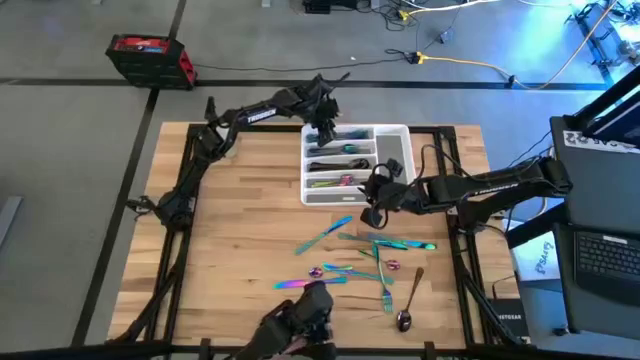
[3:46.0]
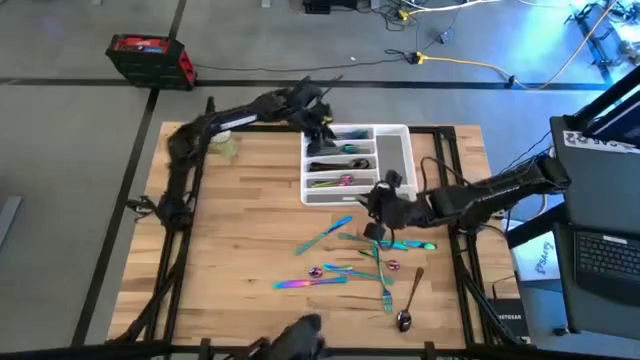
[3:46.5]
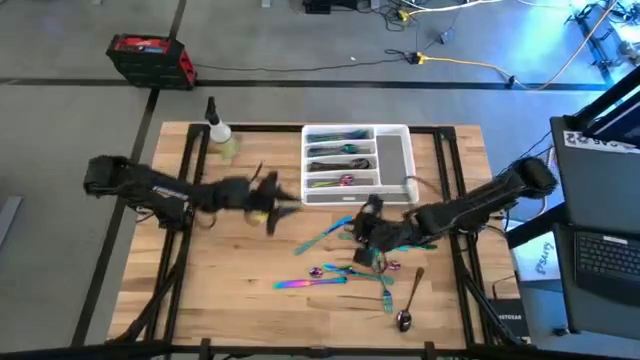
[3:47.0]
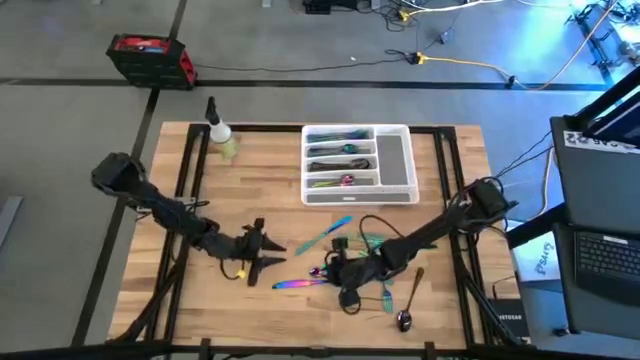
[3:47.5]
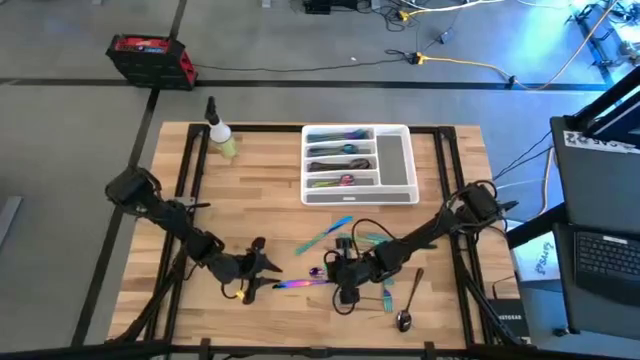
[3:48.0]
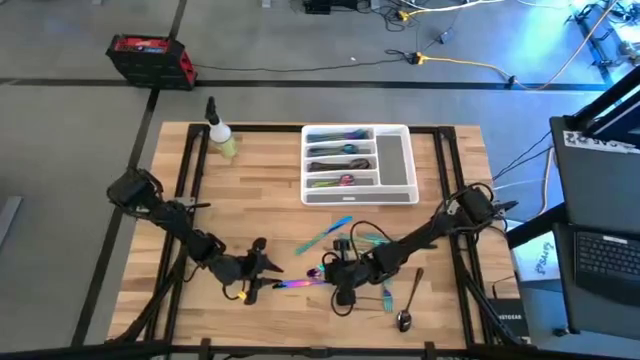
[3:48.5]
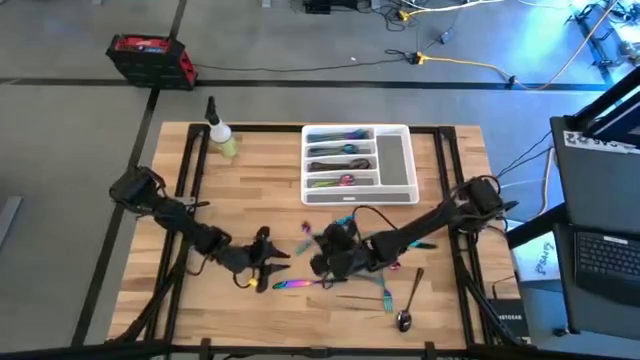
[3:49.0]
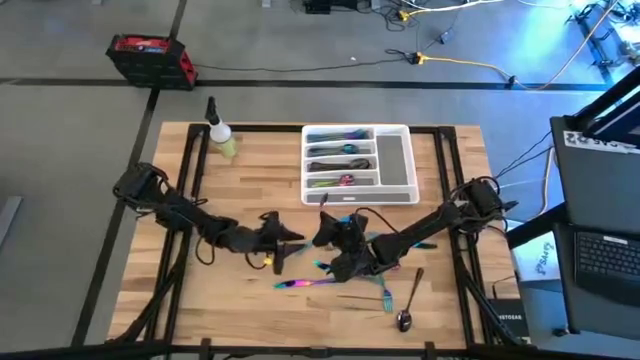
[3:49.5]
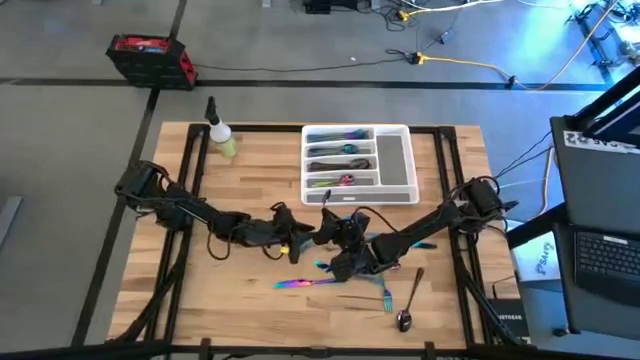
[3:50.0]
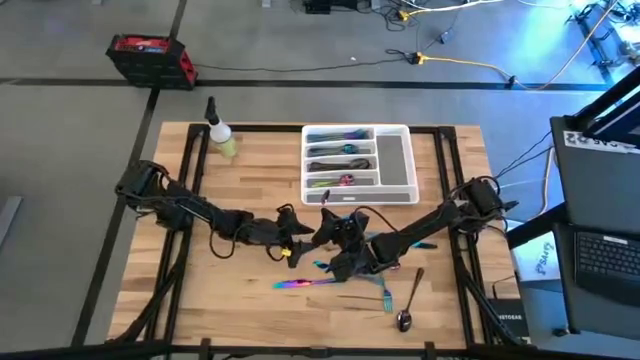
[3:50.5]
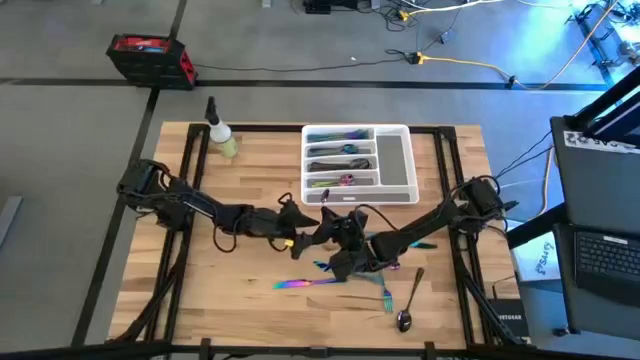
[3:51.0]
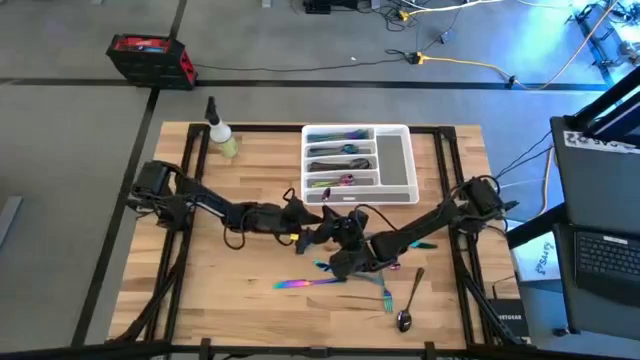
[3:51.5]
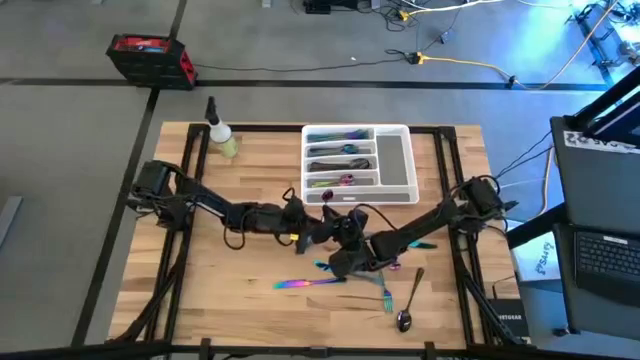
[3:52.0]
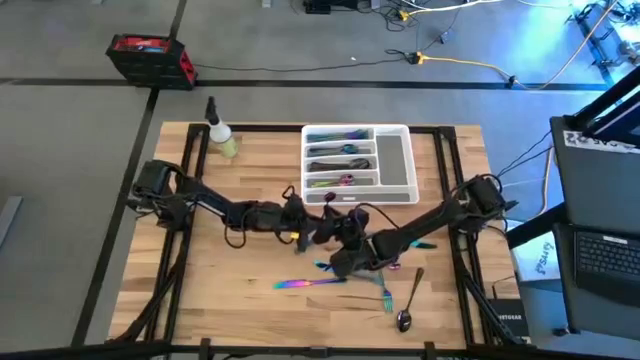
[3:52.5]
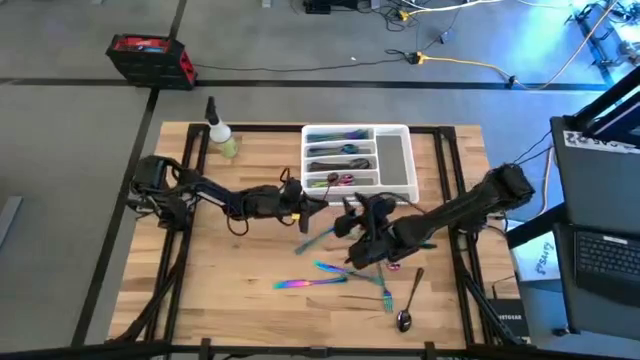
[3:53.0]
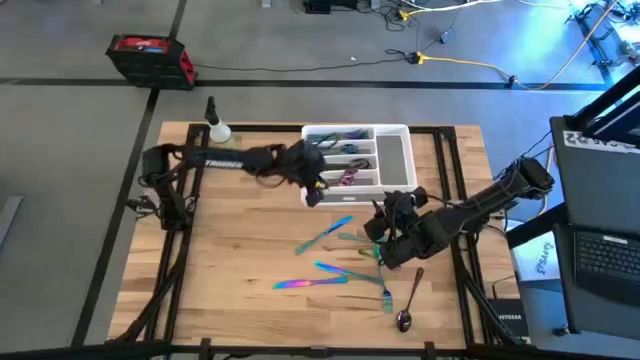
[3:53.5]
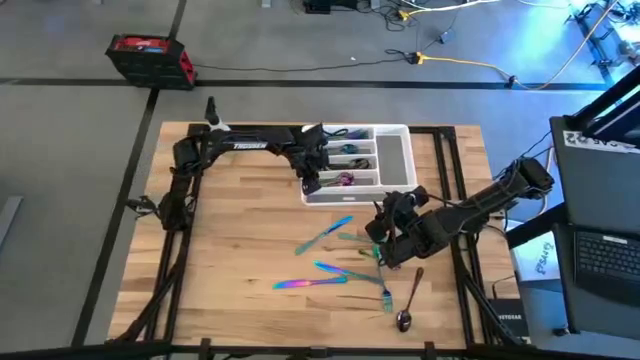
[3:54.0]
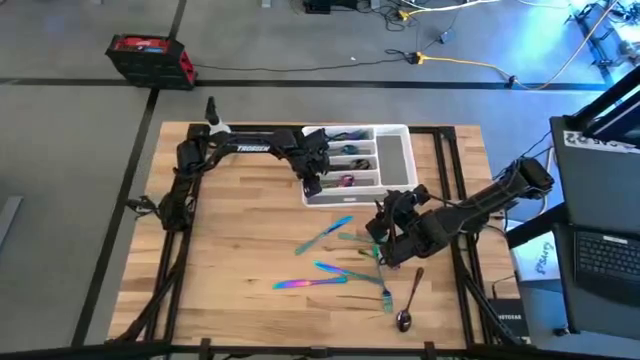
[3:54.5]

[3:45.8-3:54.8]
Task: Sort silverware
Put the blue teaspoon on the white silverware tray

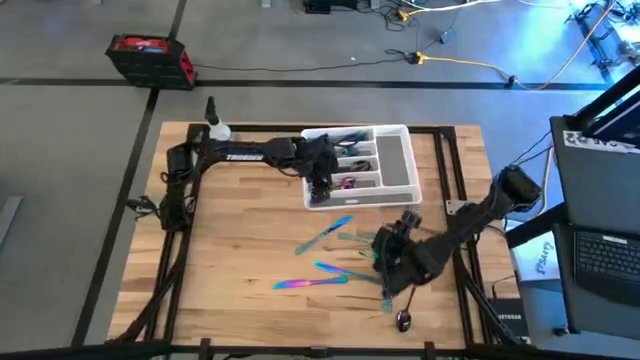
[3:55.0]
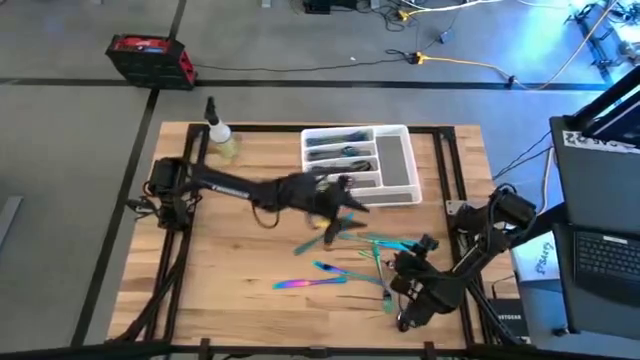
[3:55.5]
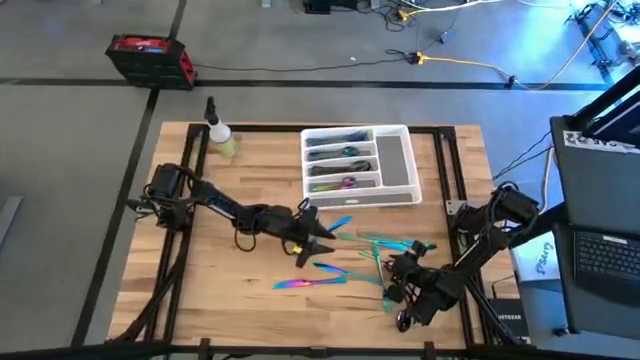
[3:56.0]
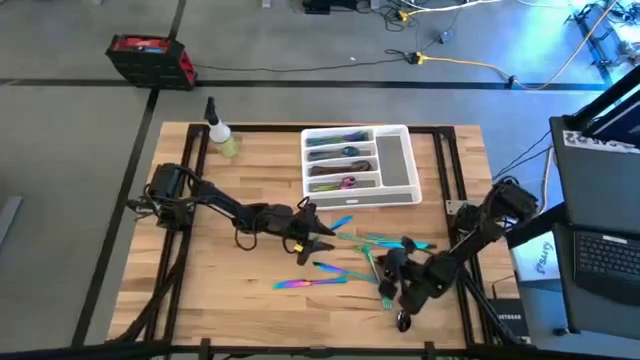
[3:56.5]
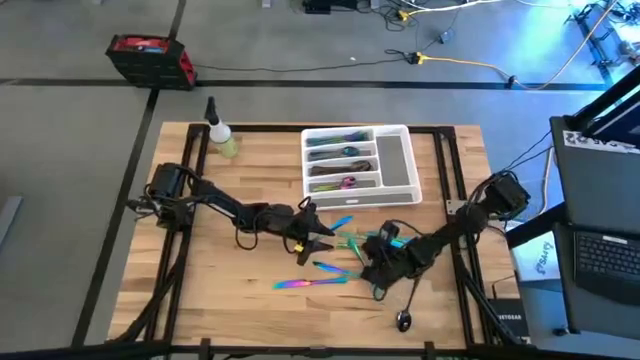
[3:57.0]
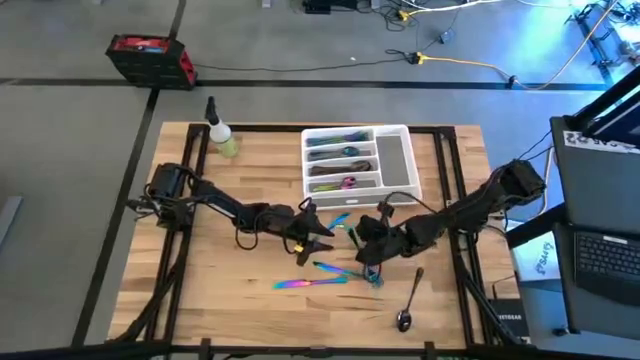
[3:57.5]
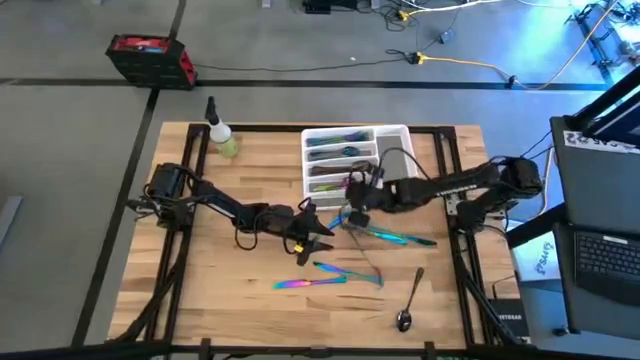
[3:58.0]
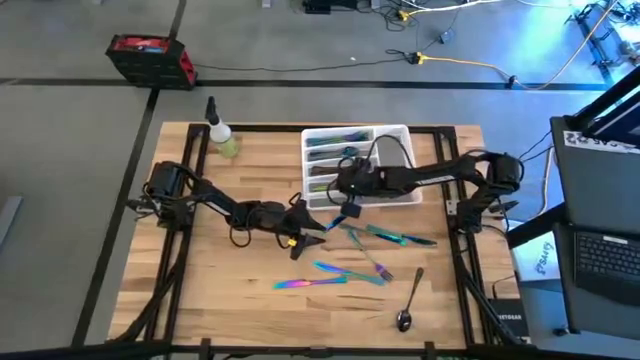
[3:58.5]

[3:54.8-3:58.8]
Put the blue teaspoon on the white silverware tray

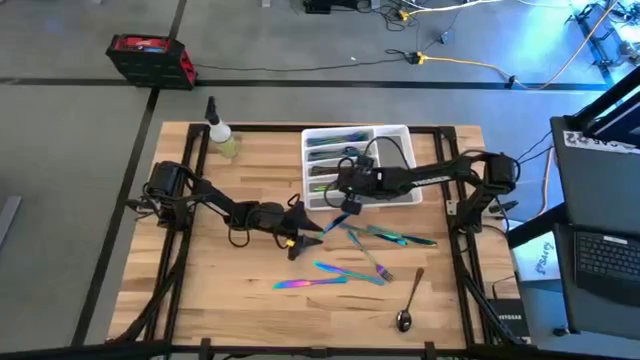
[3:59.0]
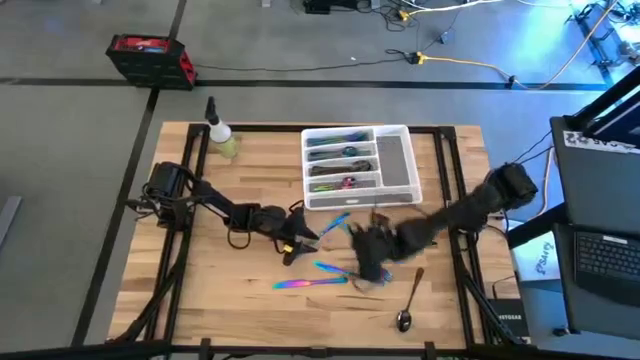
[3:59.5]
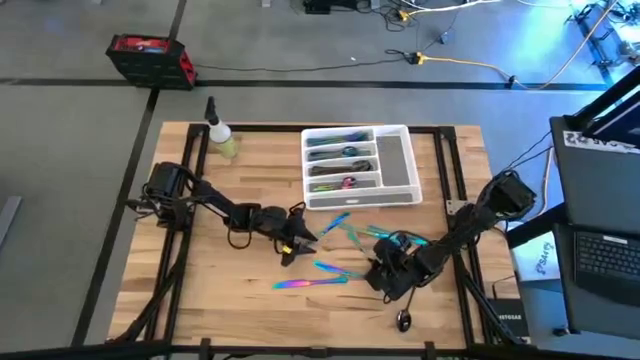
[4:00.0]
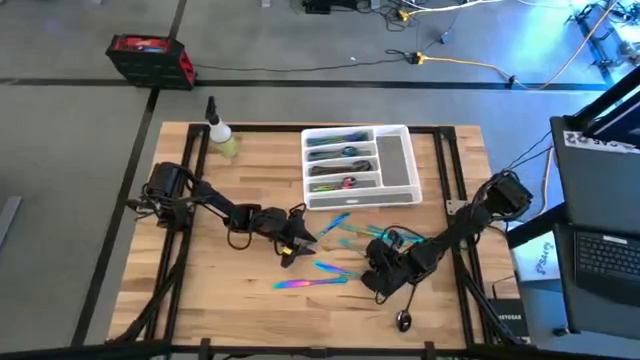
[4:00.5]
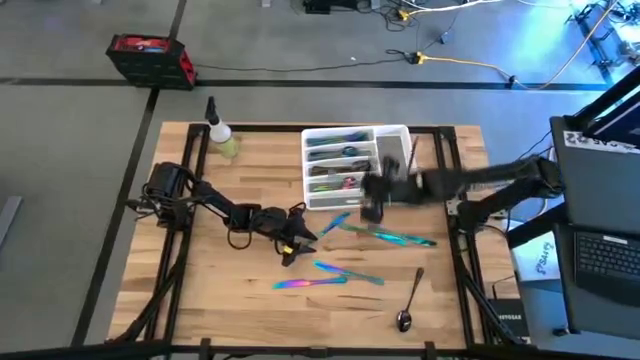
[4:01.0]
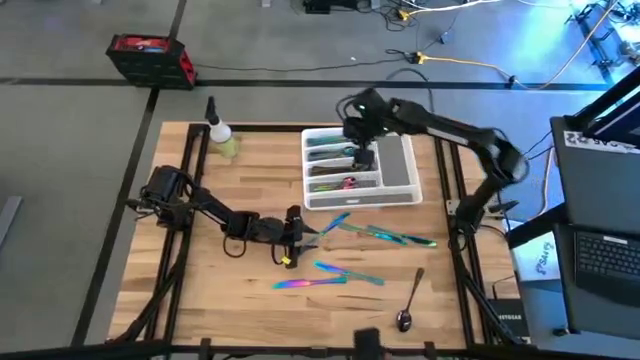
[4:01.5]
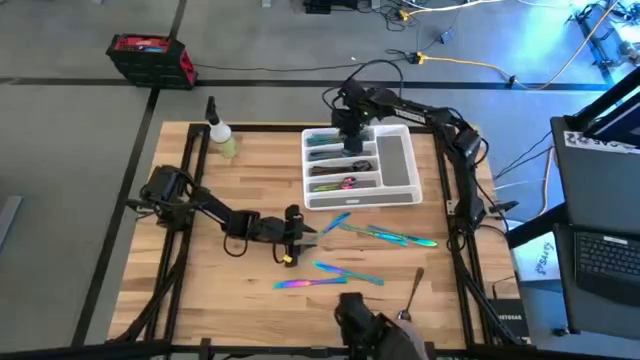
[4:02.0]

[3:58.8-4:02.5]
Put the blue fork on the white silverware tray

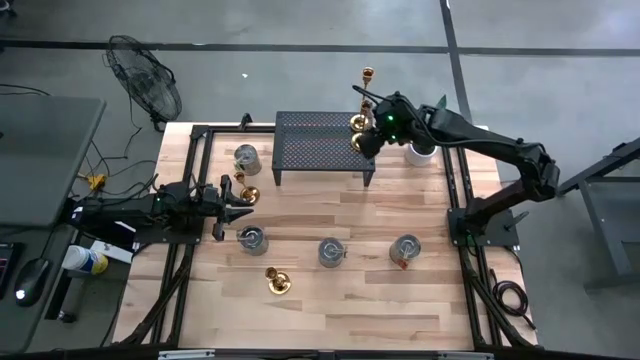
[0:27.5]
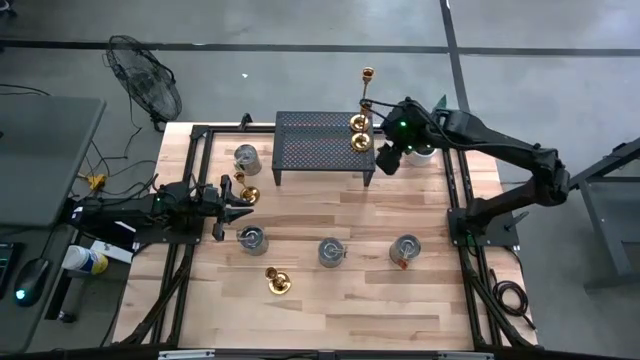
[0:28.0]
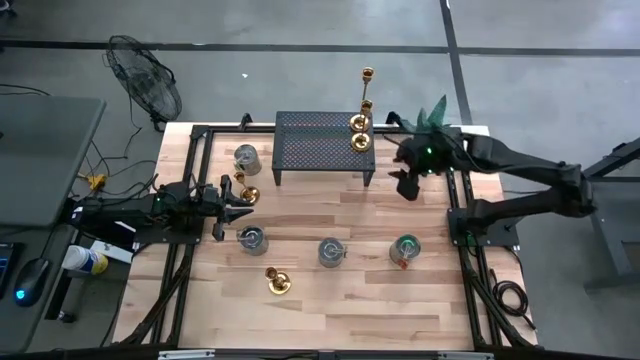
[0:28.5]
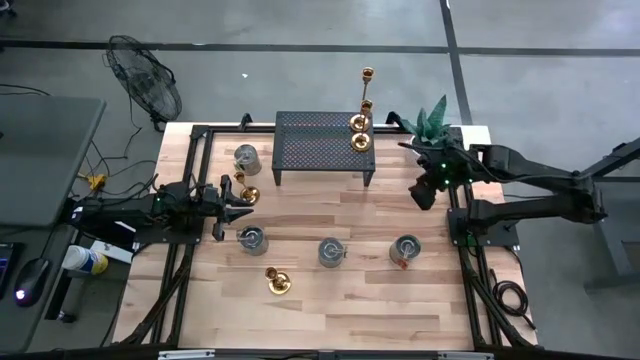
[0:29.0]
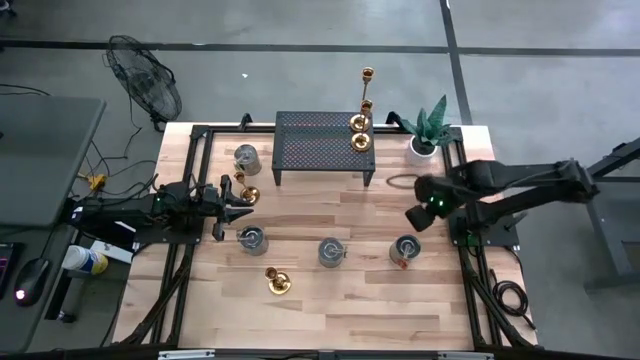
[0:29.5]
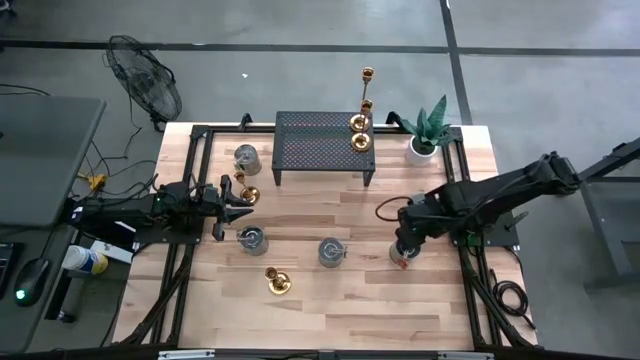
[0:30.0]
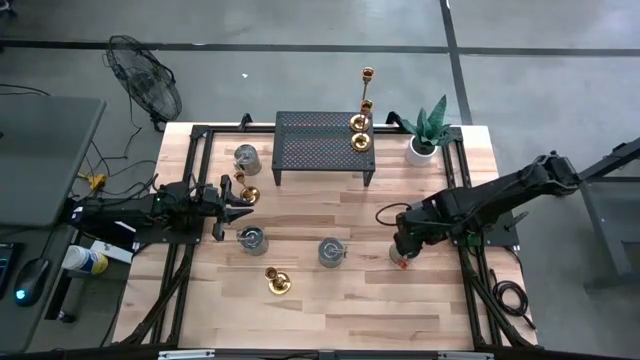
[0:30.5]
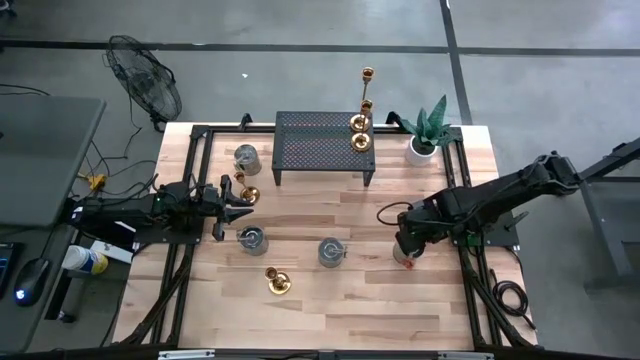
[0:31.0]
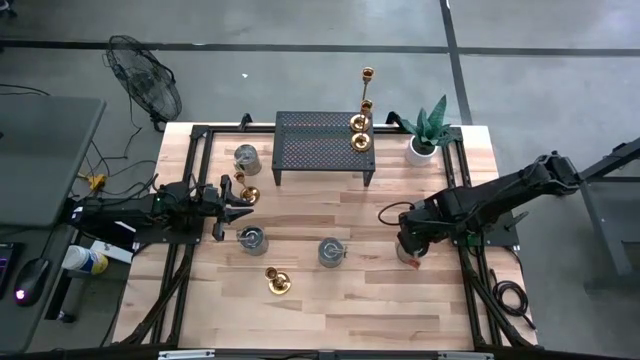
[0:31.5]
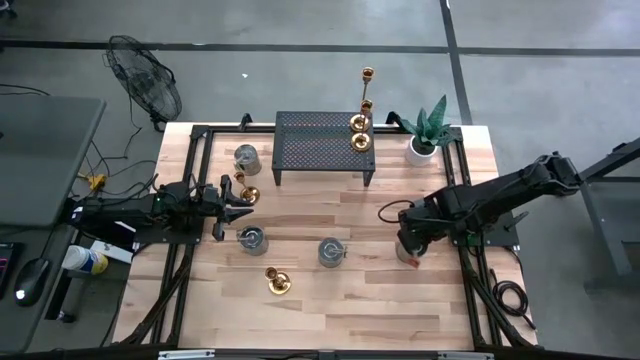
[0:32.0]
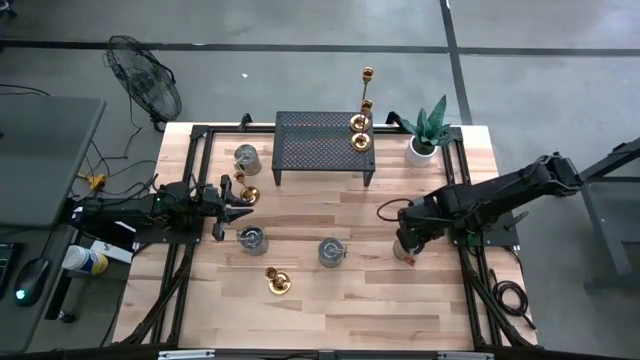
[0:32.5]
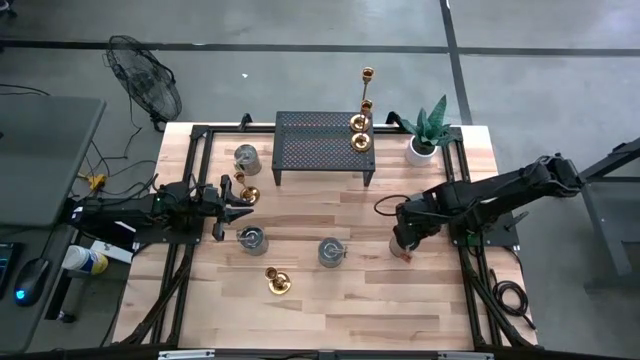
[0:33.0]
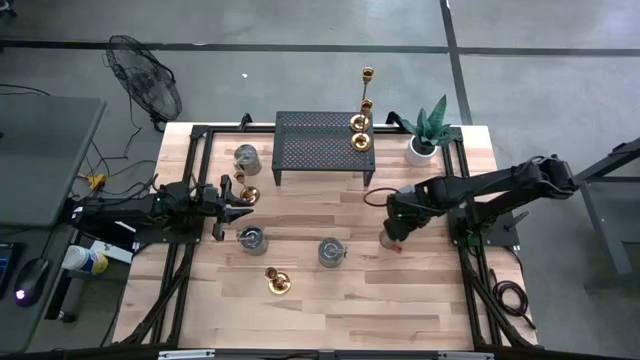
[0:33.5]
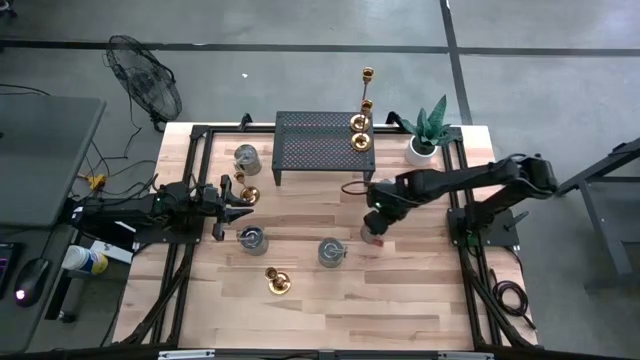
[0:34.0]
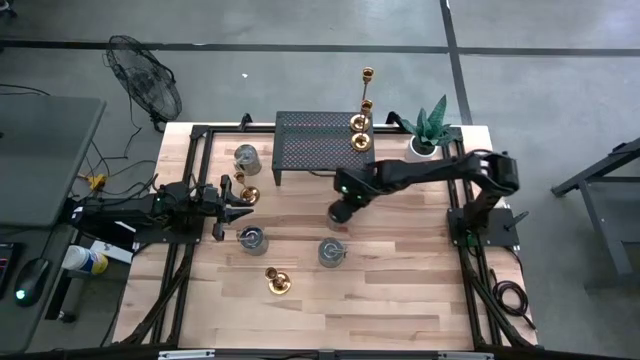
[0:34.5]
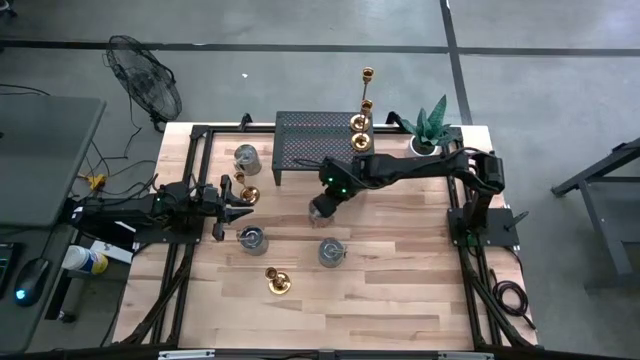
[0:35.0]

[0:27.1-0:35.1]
Task: Pick & Place candle stick holders
Move the right scented candle to the center of the table
